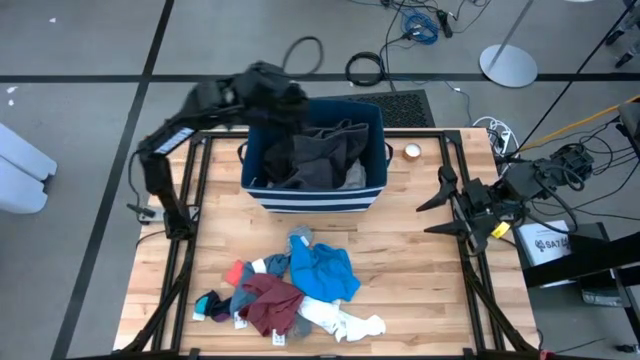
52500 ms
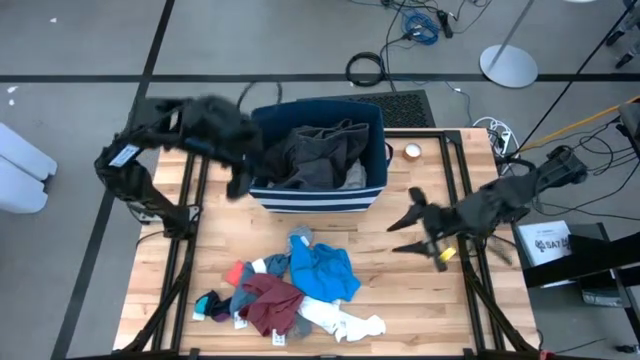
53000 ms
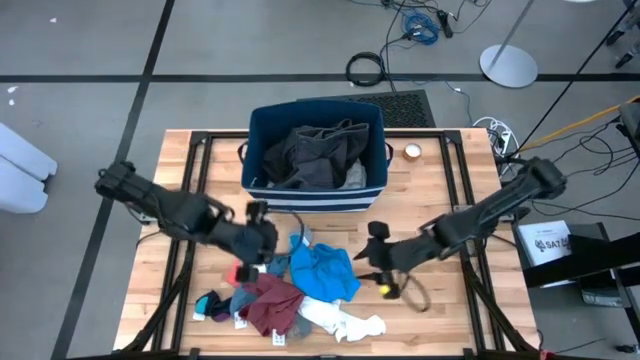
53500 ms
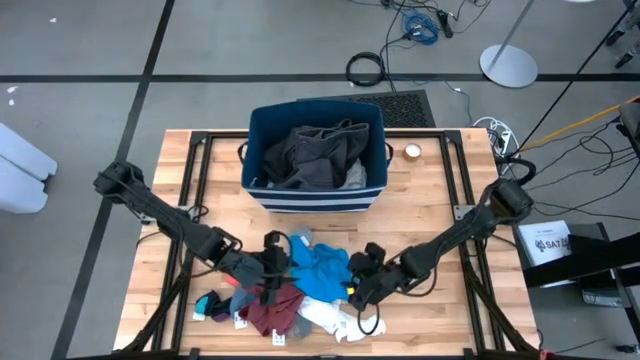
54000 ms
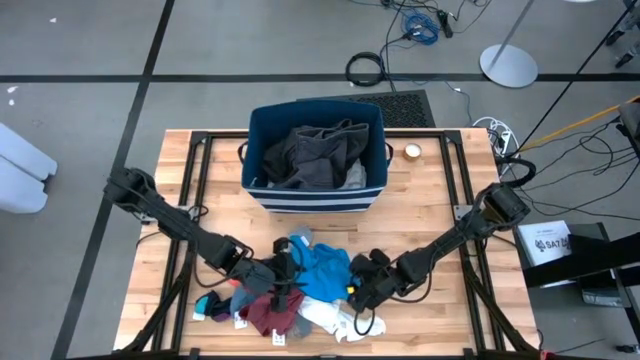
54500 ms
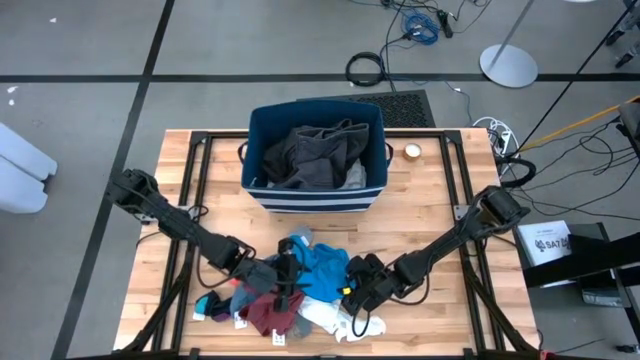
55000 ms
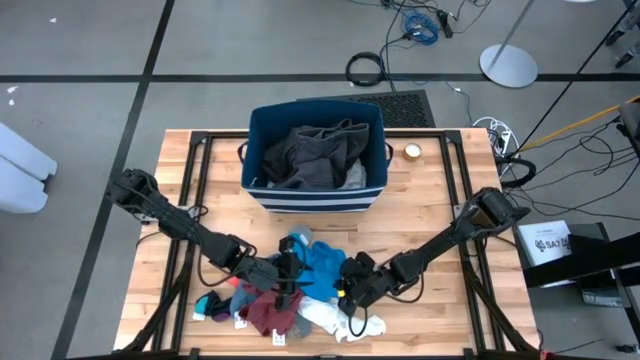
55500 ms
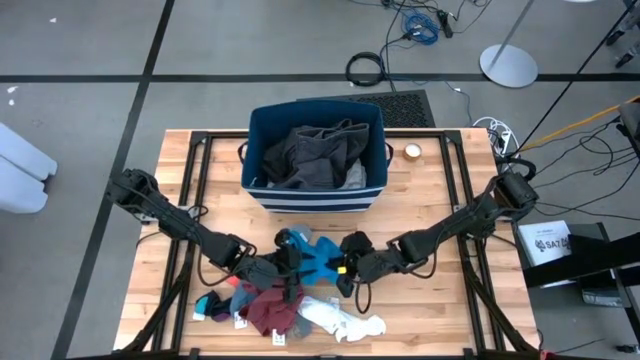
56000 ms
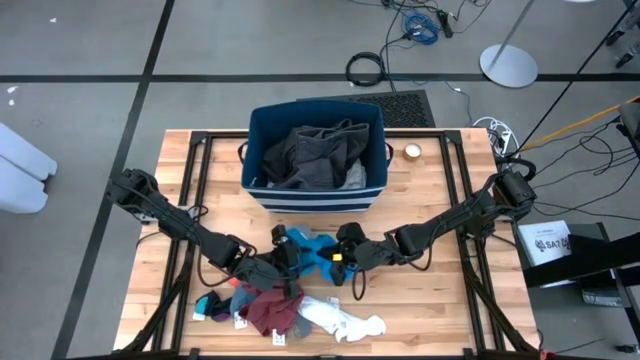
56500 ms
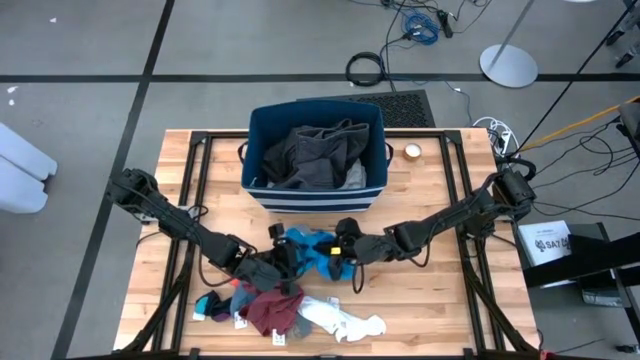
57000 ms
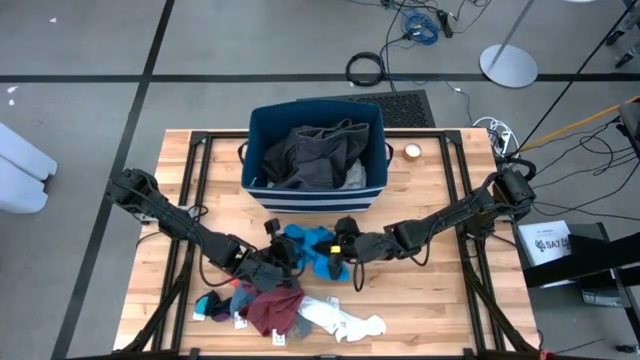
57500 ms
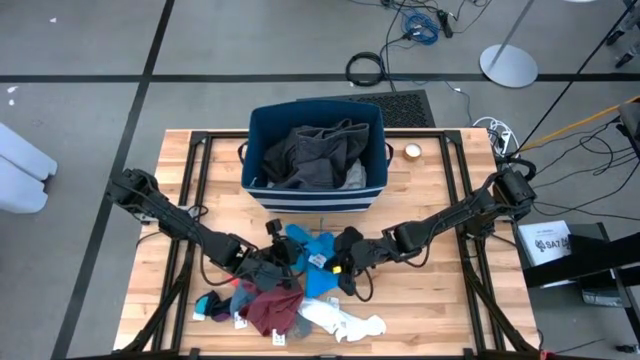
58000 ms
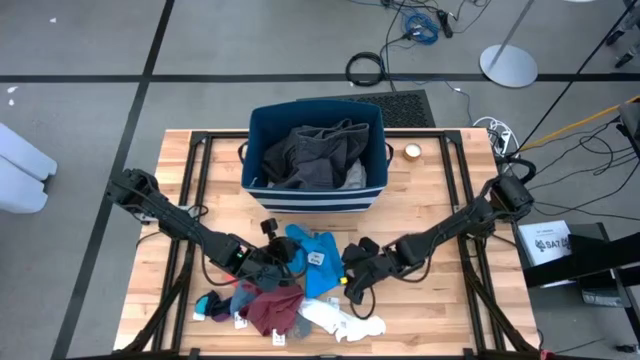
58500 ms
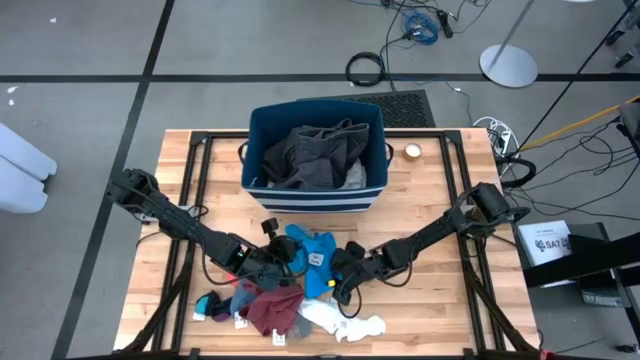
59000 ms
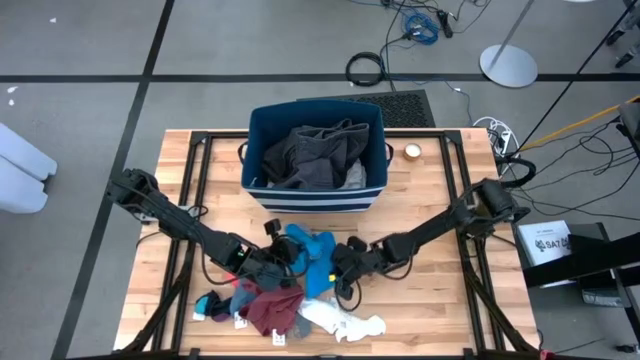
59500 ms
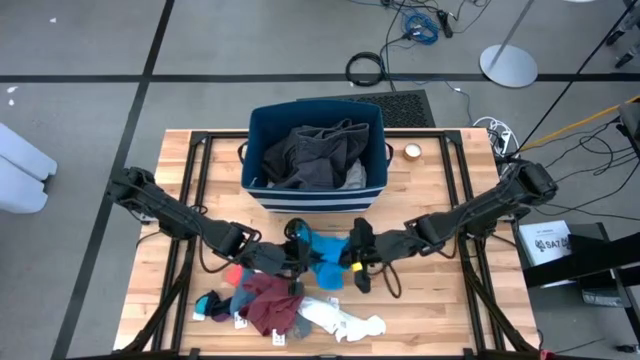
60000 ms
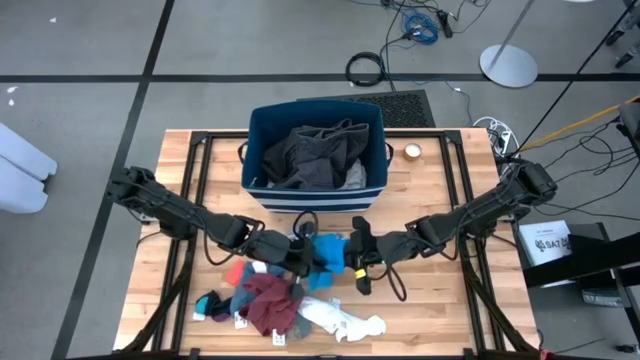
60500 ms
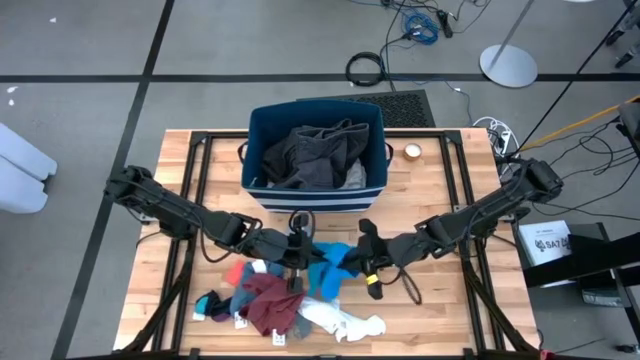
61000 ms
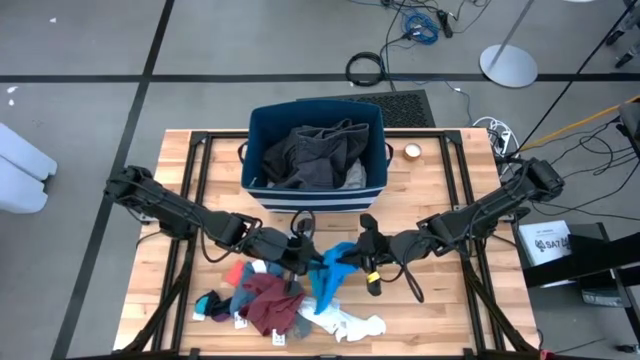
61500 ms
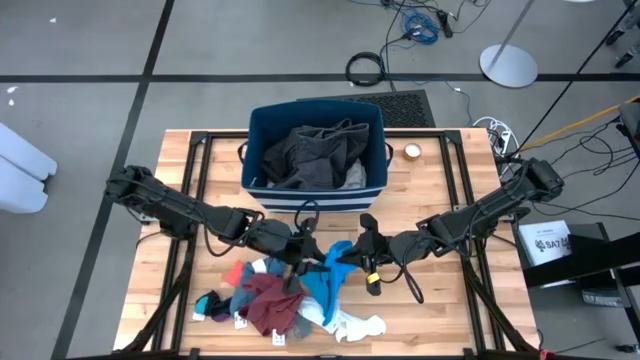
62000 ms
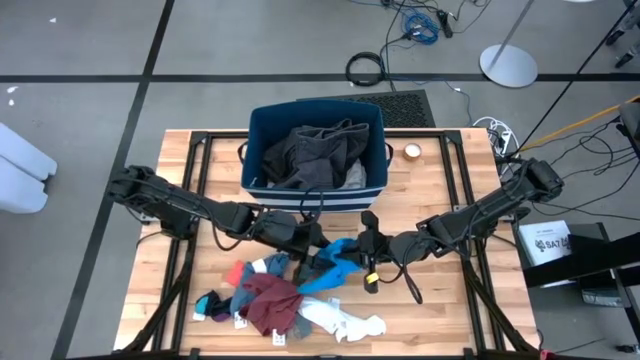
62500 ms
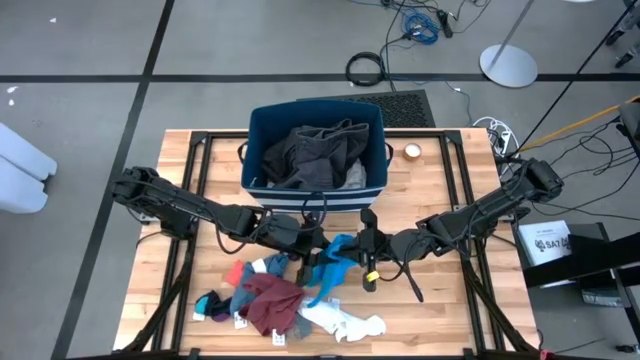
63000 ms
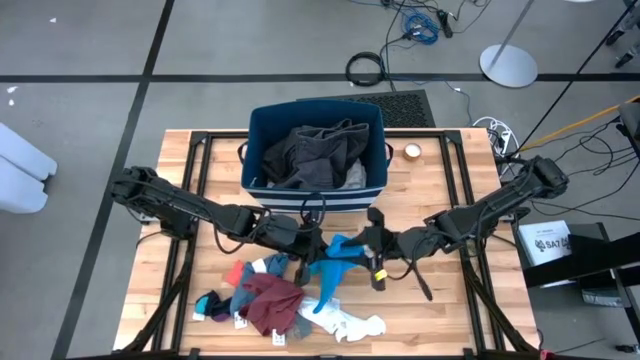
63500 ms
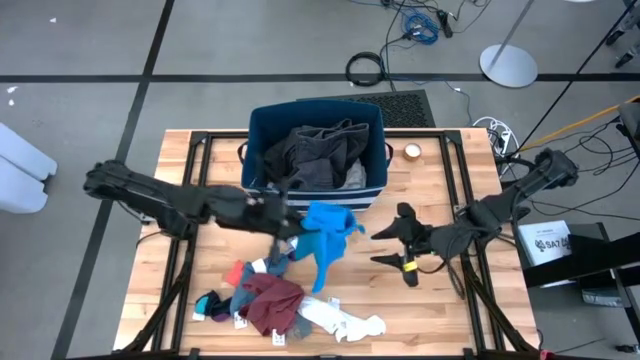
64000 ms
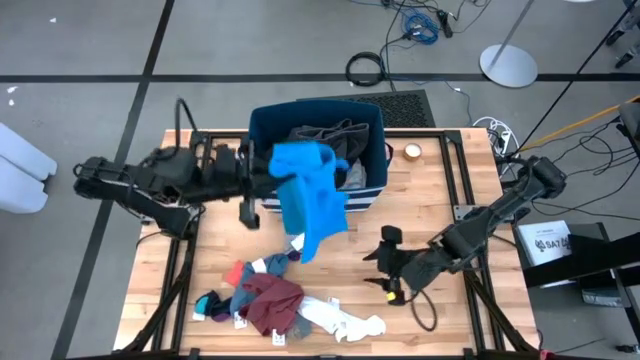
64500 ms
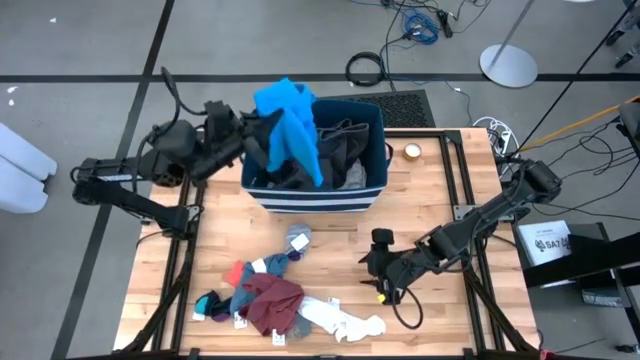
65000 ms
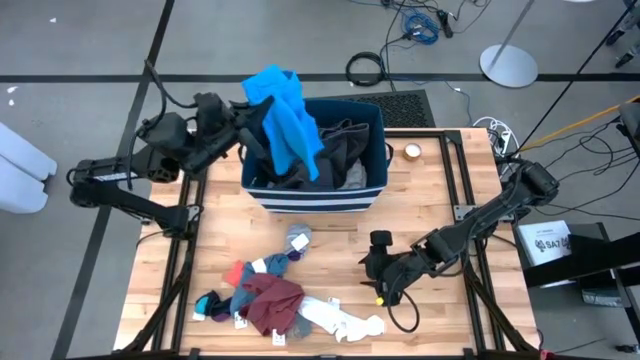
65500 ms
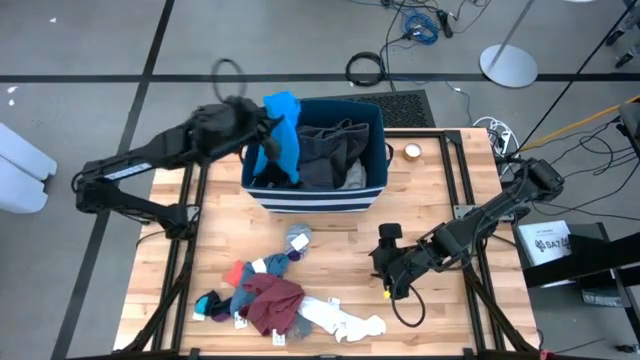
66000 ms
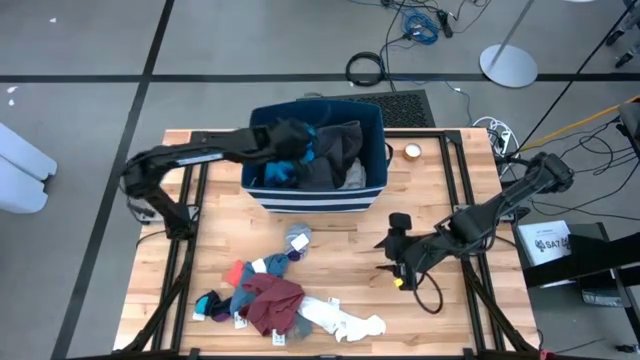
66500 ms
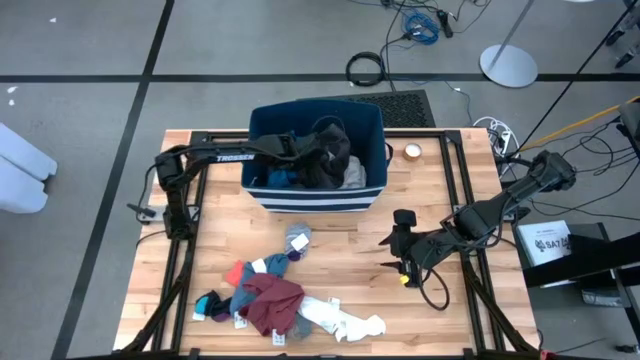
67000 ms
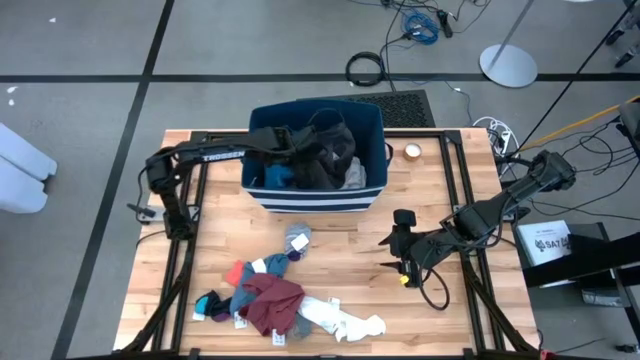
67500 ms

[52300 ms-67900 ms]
Task: Sort clothes
Put the blue shorts into the blue bin

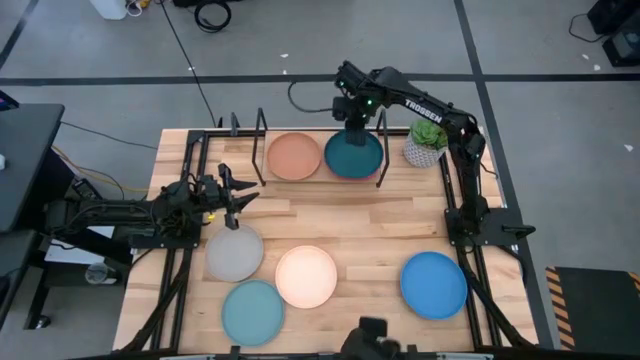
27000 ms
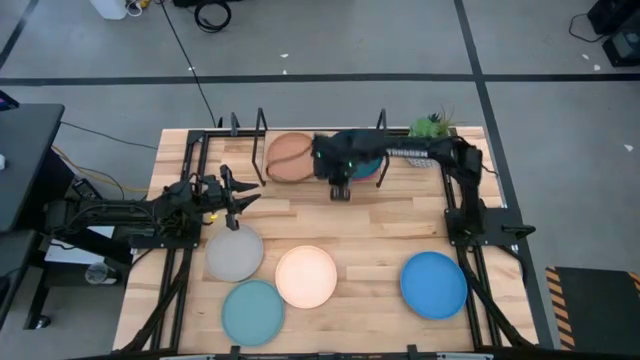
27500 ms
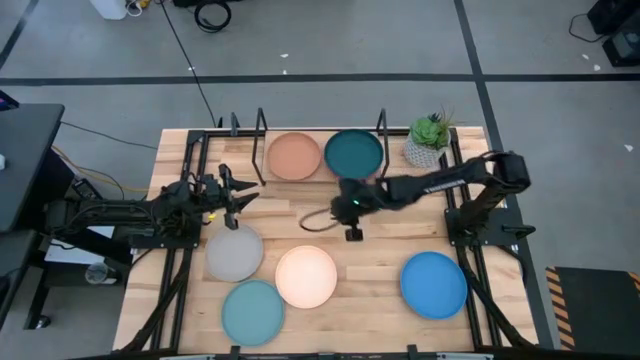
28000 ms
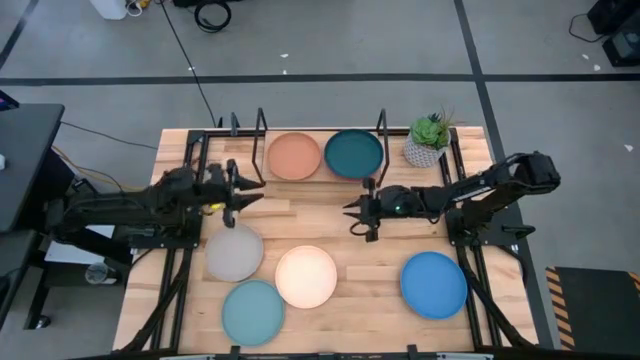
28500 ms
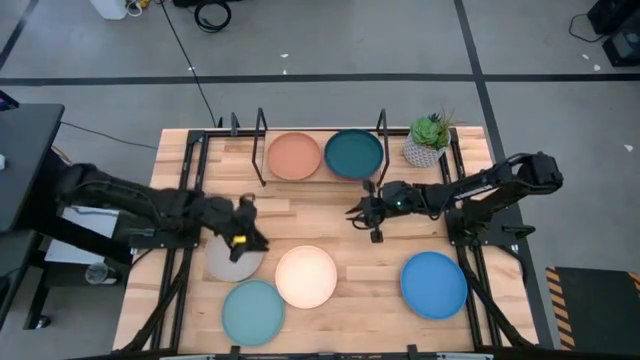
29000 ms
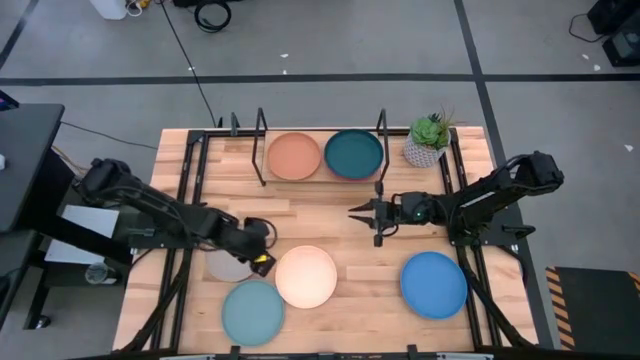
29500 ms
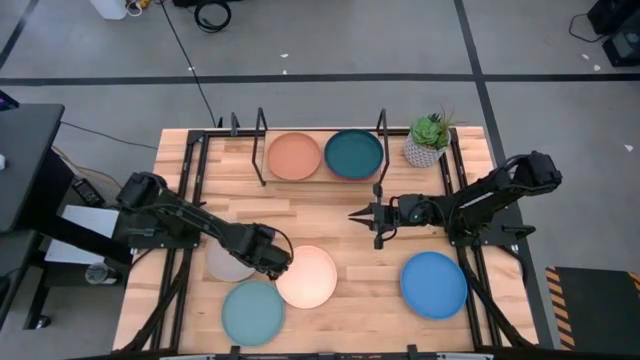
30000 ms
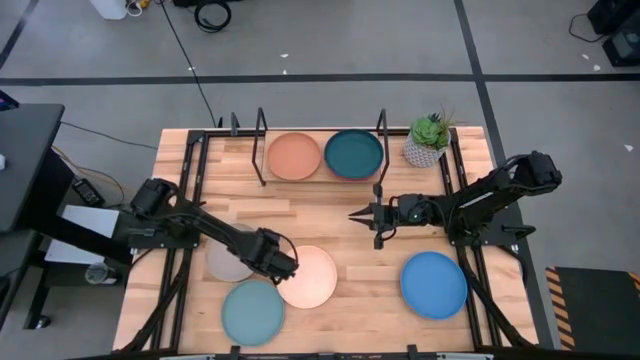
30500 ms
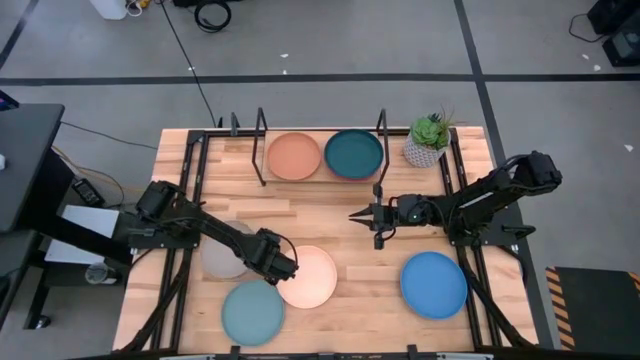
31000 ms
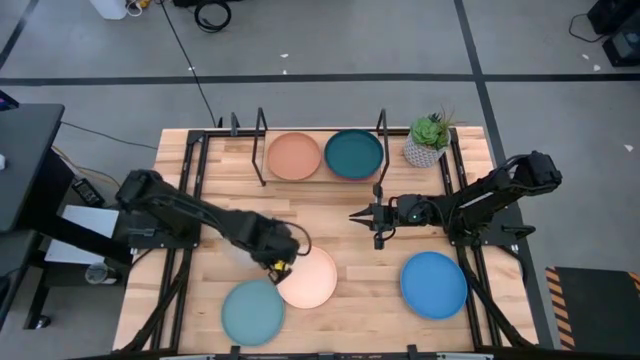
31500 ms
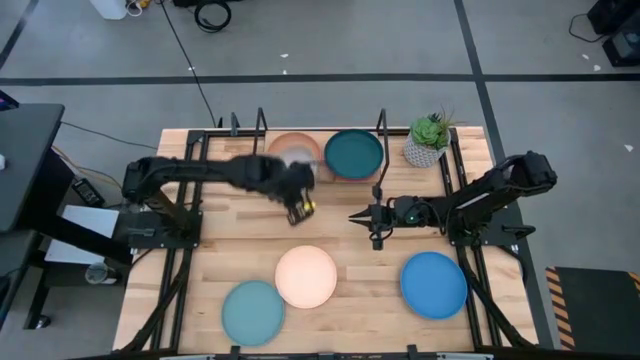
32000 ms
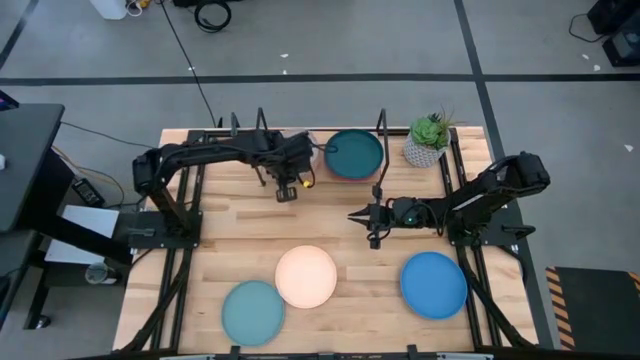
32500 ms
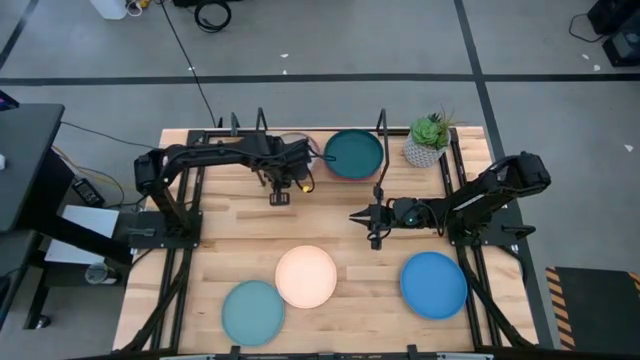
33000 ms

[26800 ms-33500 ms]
Task: Place and stack plates onto a shelf
Stack the grey plate on top of the brown plate on the shelf
